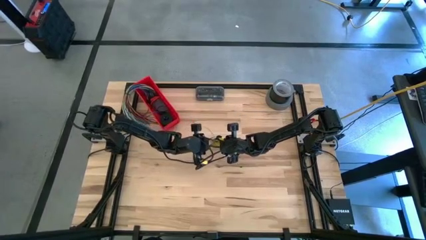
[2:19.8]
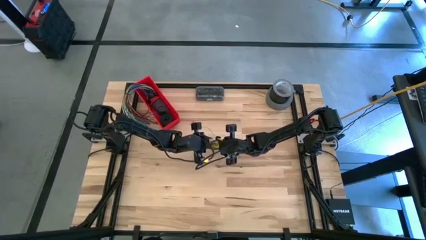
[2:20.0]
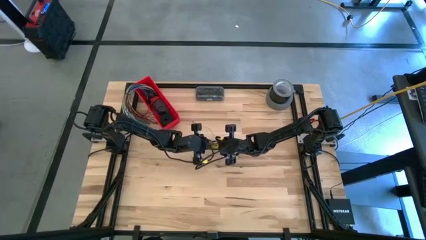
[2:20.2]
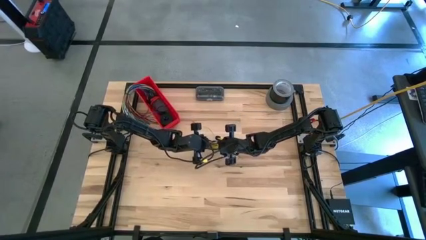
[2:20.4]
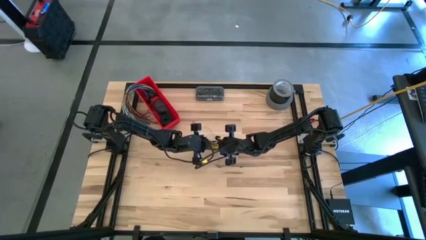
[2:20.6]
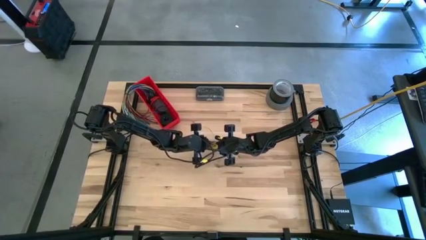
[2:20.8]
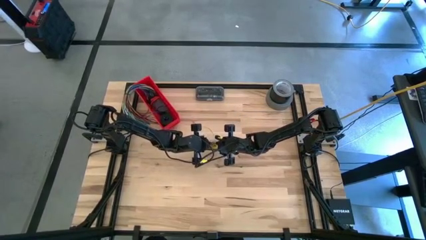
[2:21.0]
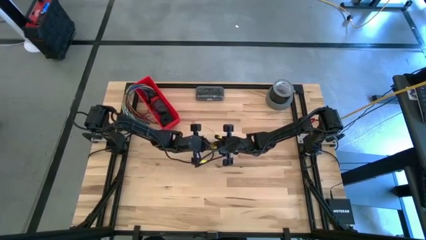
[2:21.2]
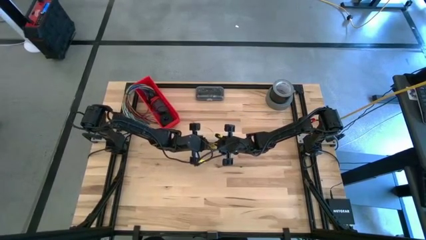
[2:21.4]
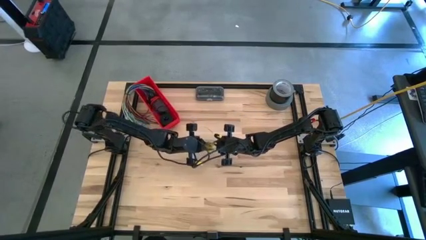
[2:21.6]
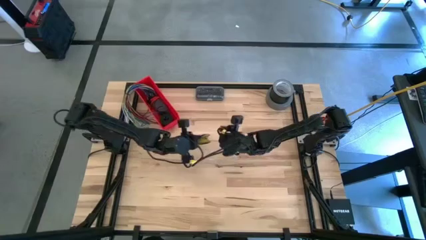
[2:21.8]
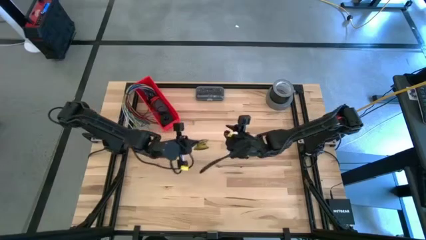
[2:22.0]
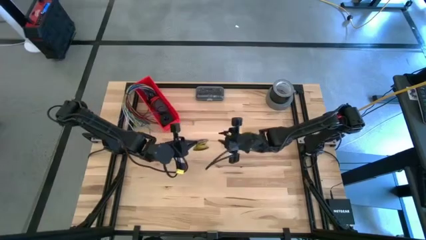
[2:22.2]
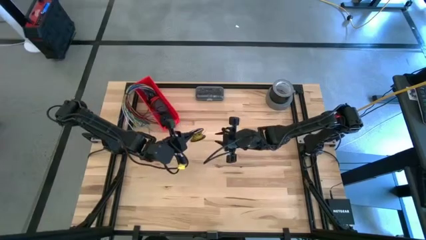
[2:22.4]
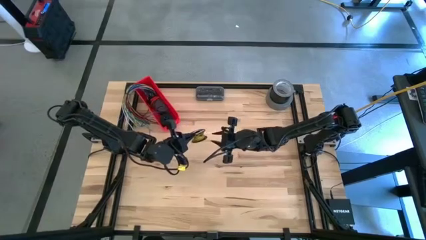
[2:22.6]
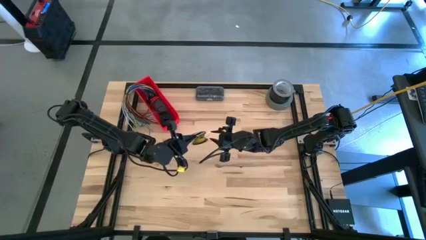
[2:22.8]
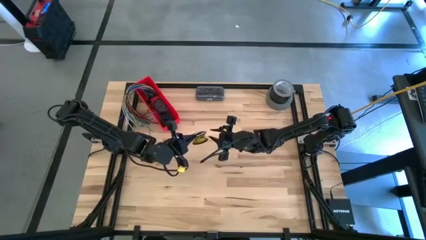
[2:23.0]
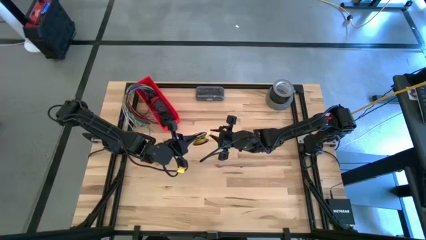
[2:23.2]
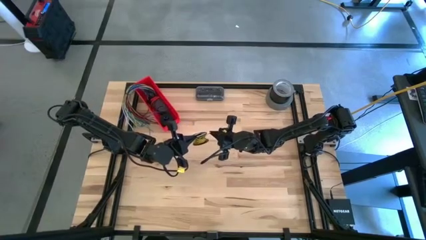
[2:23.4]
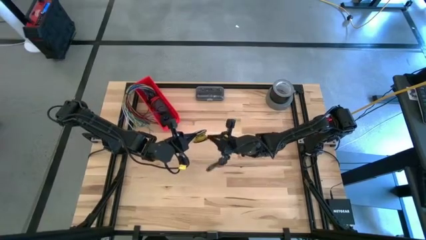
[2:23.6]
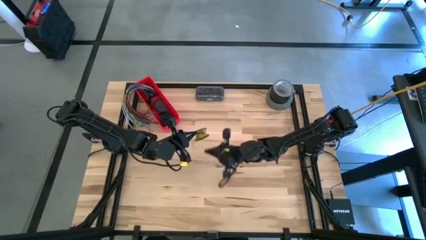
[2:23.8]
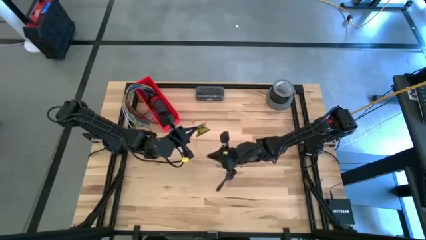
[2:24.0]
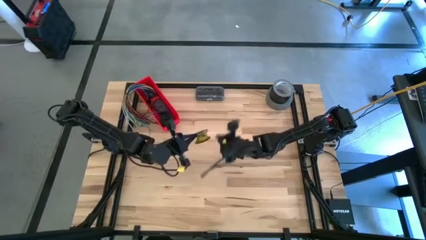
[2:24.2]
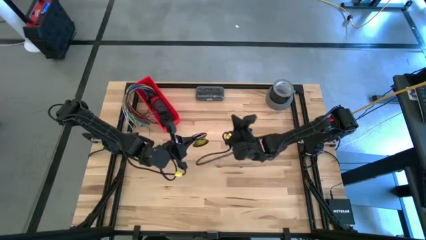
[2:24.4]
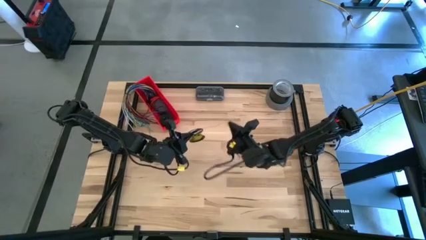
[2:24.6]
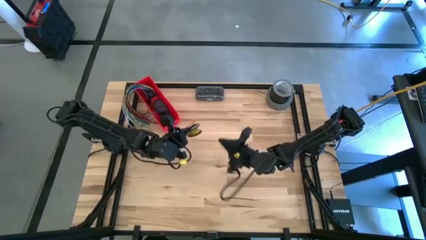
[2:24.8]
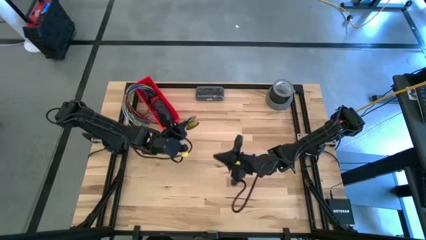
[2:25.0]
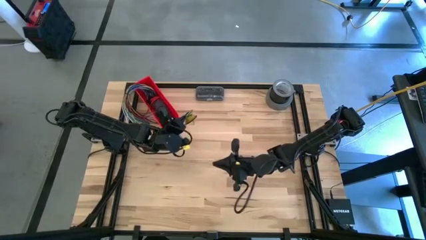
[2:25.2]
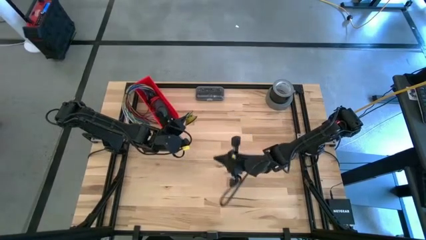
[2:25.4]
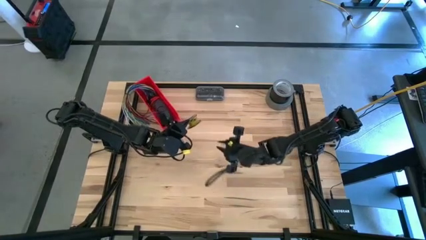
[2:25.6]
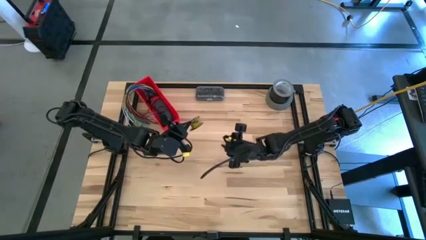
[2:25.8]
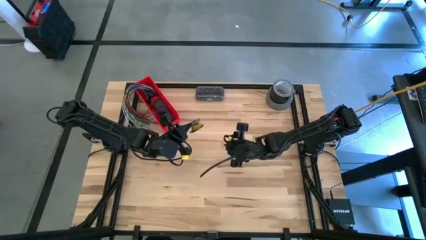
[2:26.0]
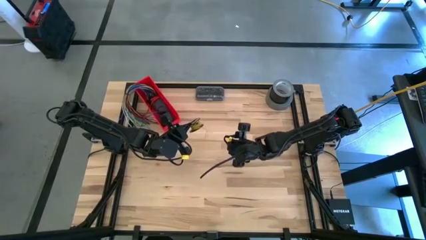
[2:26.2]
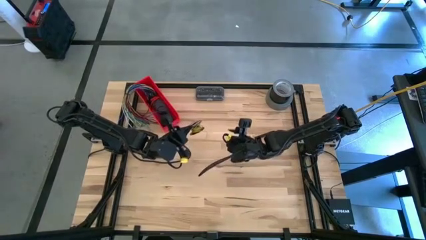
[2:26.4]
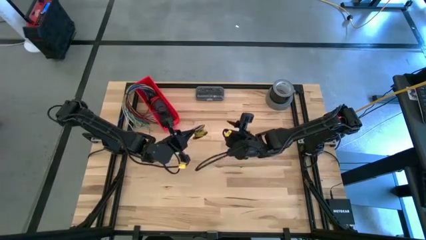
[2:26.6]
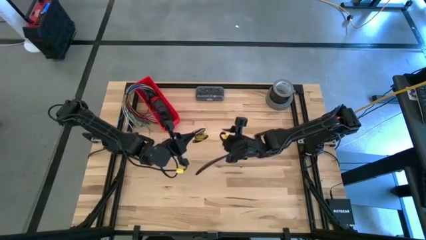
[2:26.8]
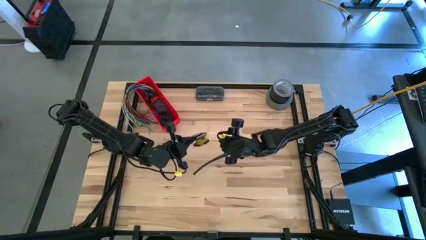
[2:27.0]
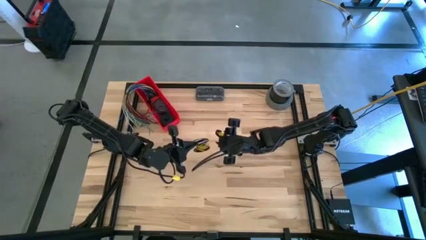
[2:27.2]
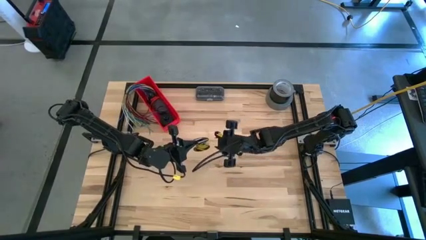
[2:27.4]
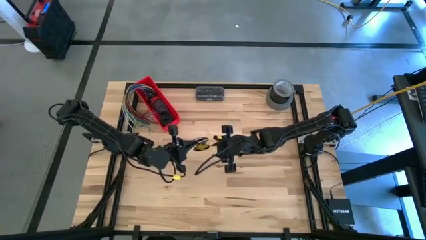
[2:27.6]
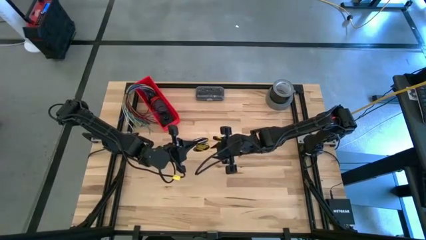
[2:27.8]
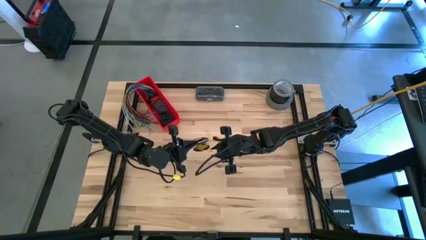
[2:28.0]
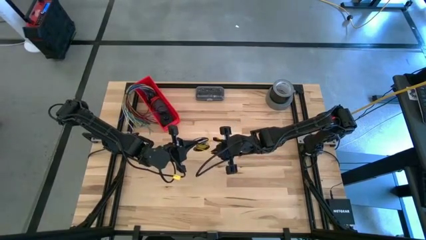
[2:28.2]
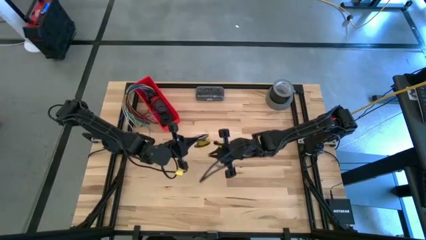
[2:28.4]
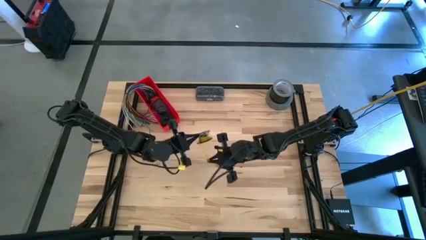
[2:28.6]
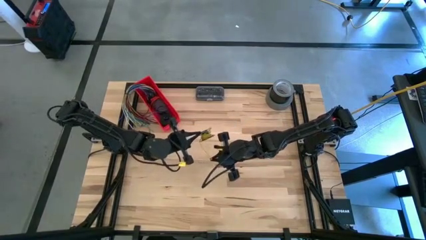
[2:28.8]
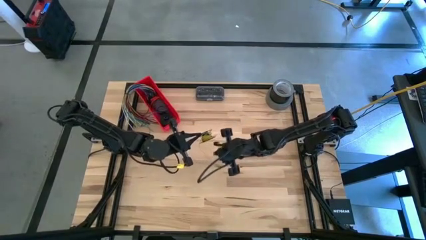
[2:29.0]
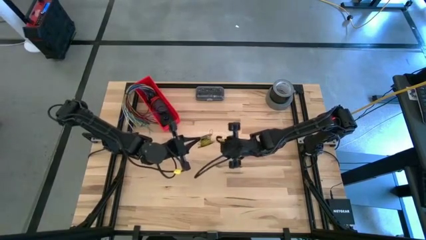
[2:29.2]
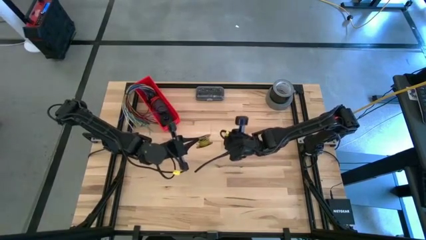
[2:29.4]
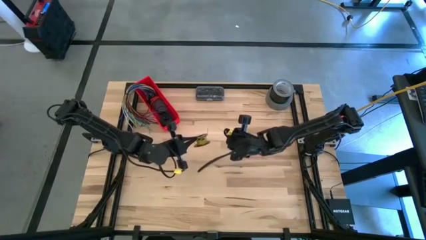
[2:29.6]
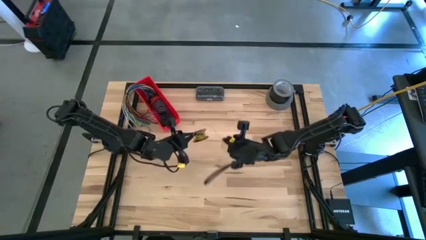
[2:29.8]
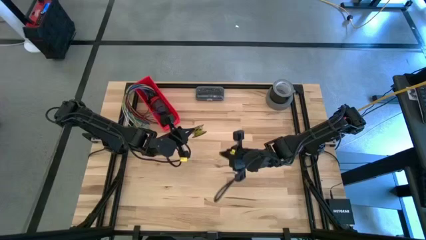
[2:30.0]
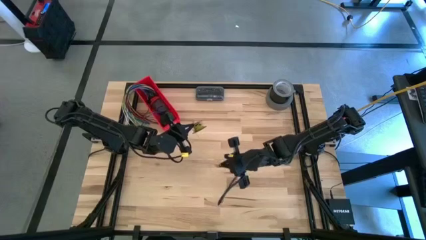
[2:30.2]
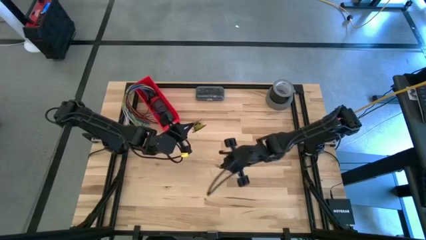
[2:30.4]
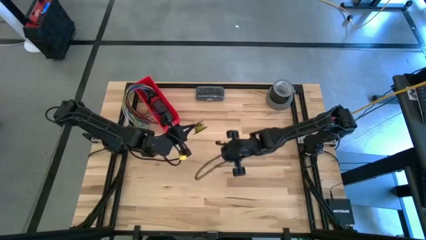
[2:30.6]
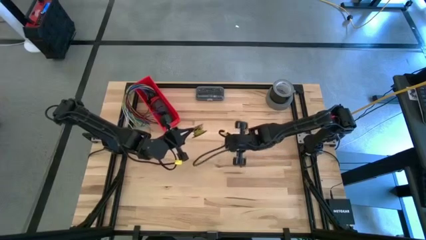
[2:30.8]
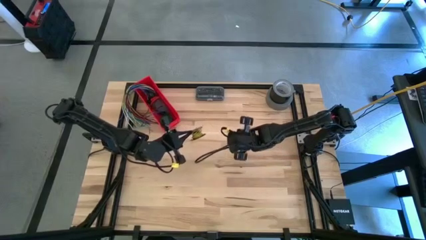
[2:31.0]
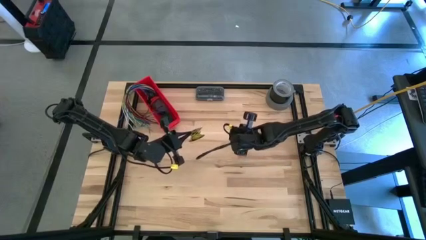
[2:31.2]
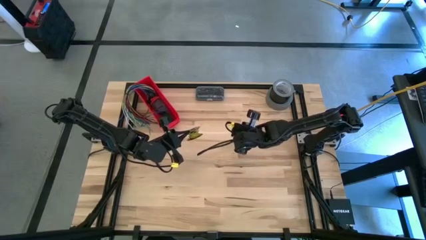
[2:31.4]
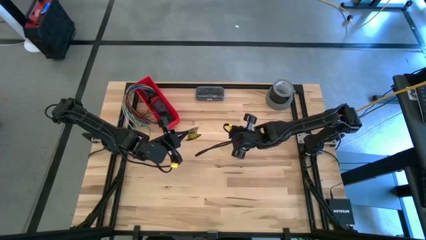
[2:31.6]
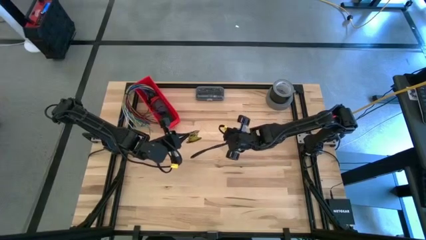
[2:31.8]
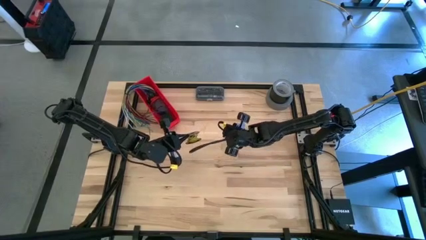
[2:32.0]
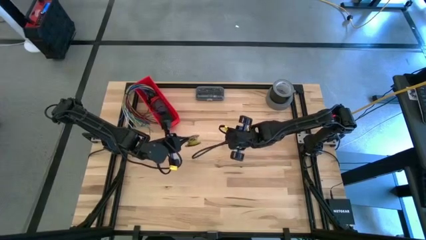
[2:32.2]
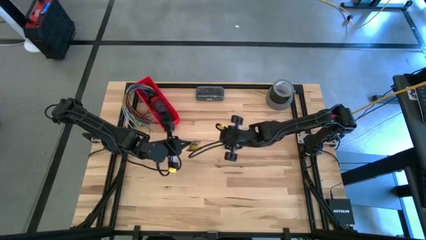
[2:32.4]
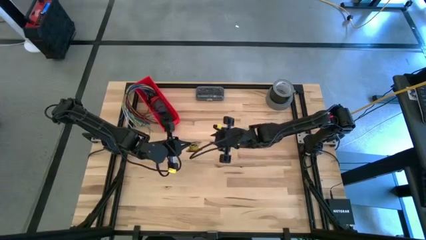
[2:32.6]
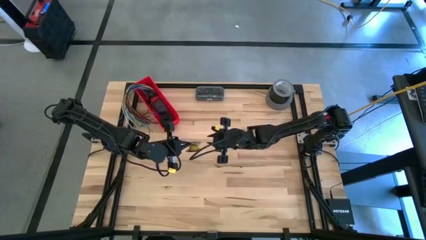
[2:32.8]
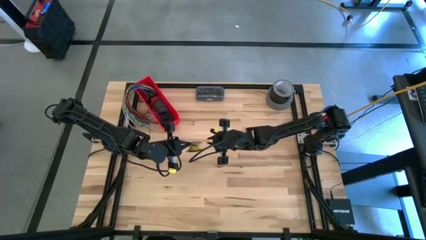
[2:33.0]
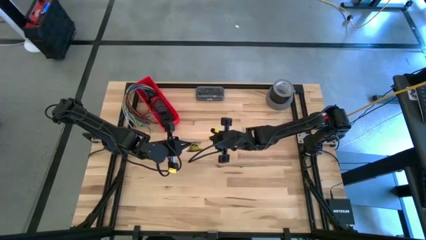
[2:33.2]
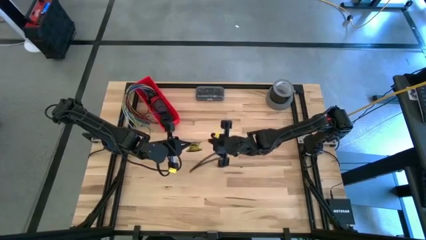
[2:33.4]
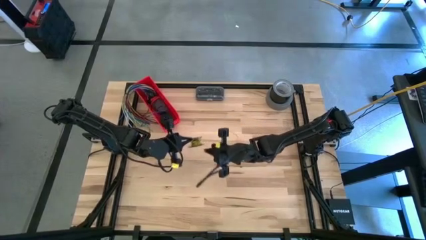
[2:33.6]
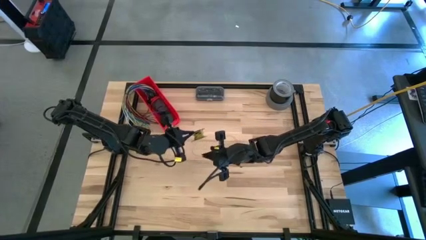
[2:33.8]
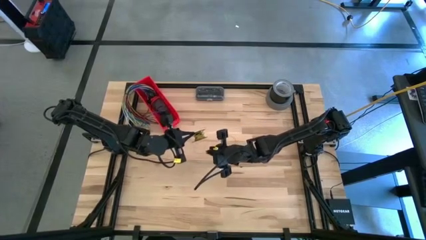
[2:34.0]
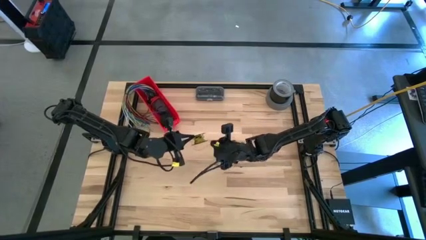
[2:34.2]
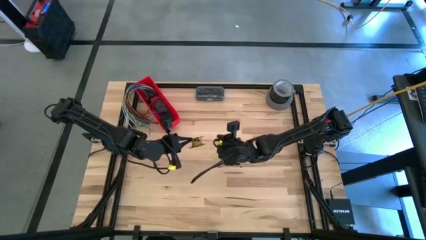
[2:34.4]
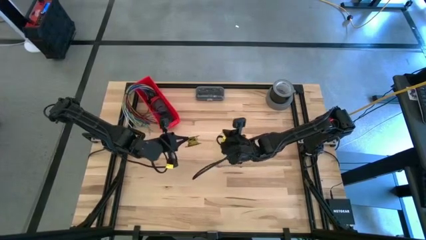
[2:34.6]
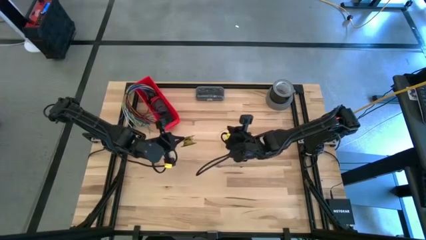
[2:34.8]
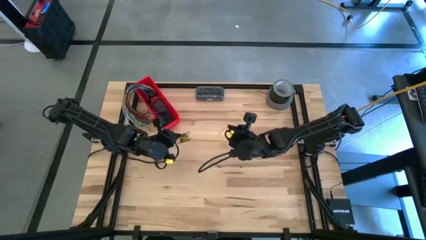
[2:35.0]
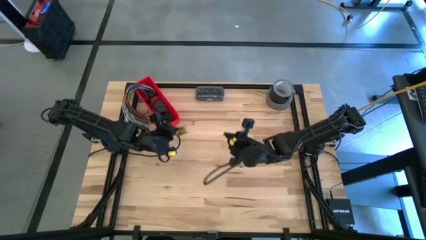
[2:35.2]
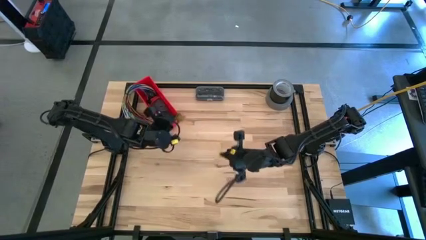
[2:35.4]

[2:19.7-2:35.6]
Task: Coil cords
Uncoil the yellow wire from the spool
